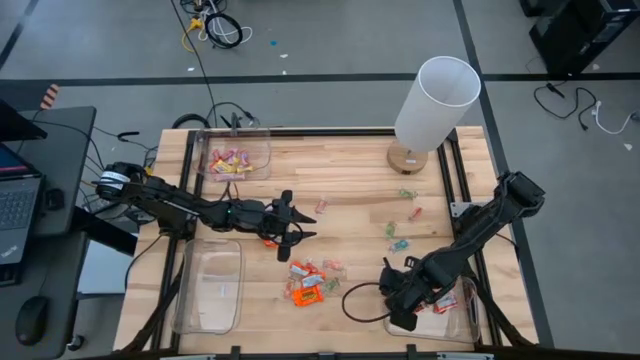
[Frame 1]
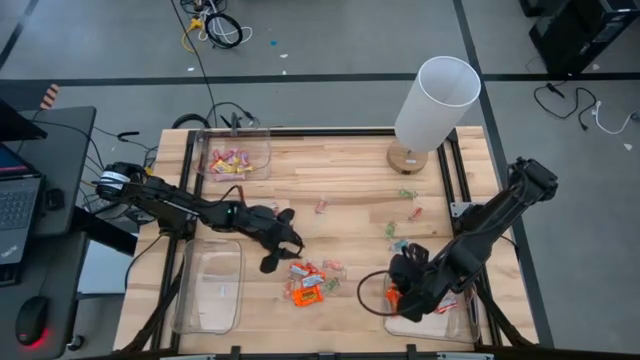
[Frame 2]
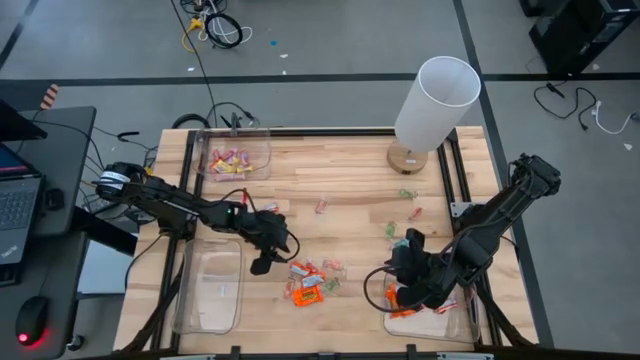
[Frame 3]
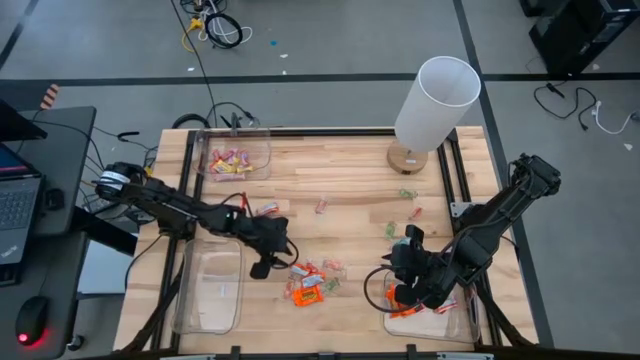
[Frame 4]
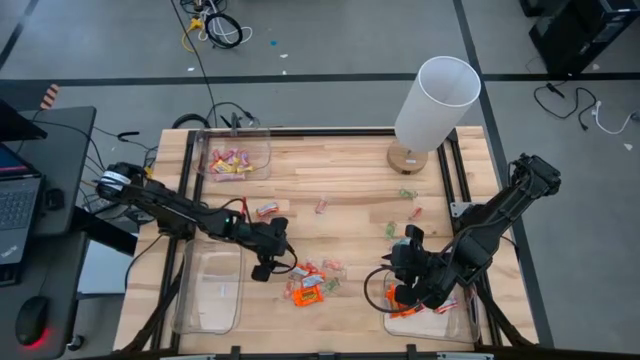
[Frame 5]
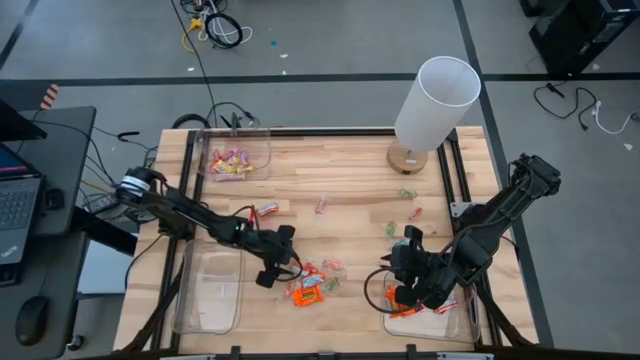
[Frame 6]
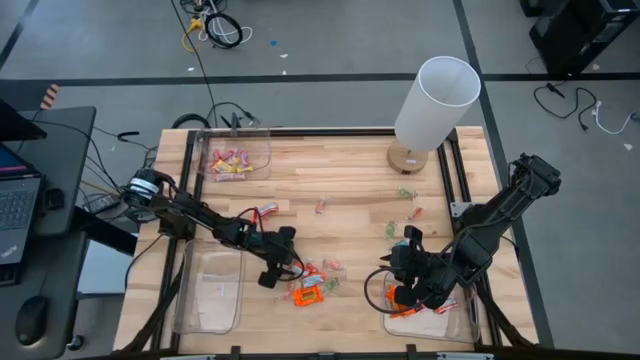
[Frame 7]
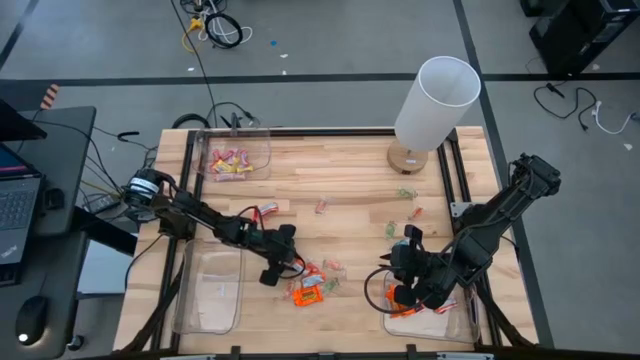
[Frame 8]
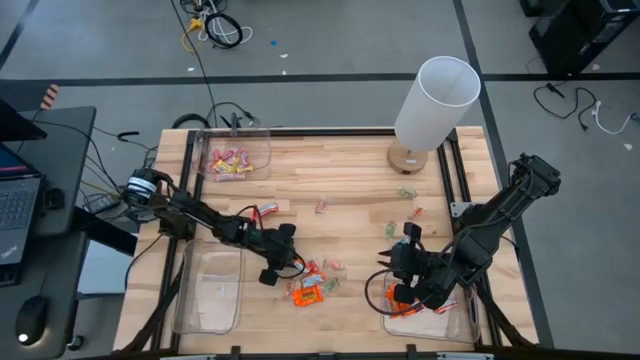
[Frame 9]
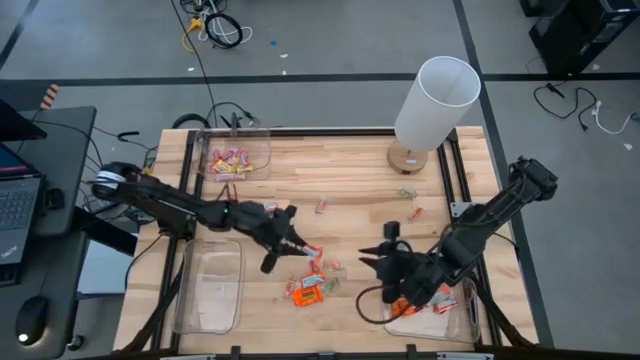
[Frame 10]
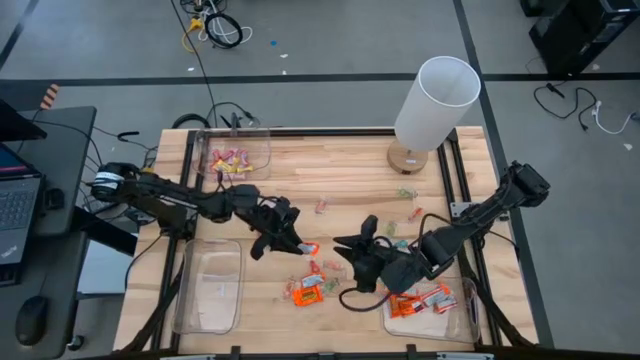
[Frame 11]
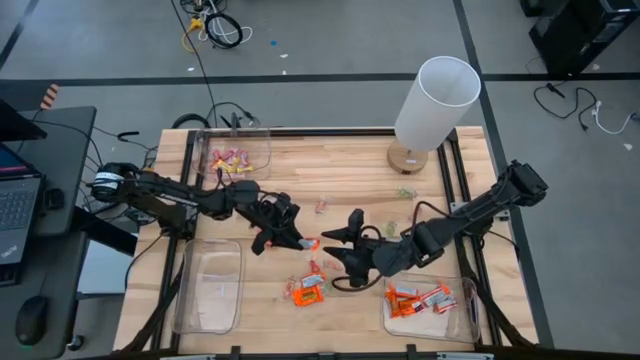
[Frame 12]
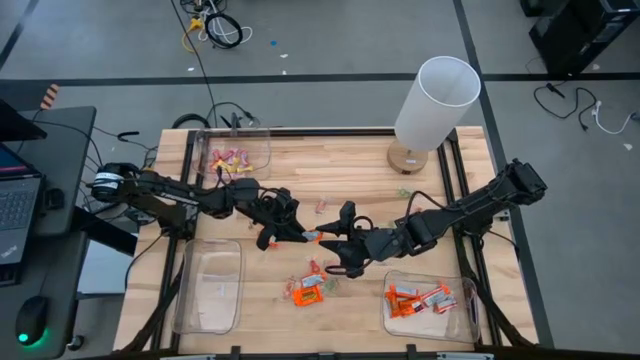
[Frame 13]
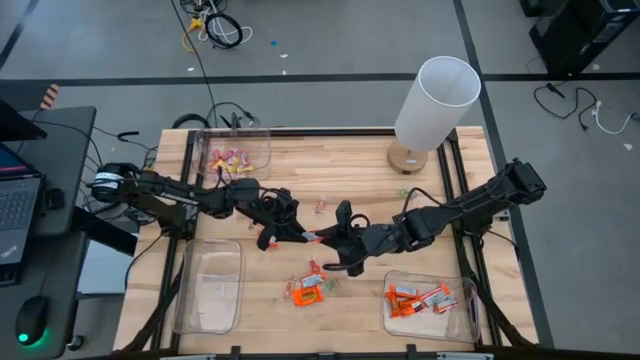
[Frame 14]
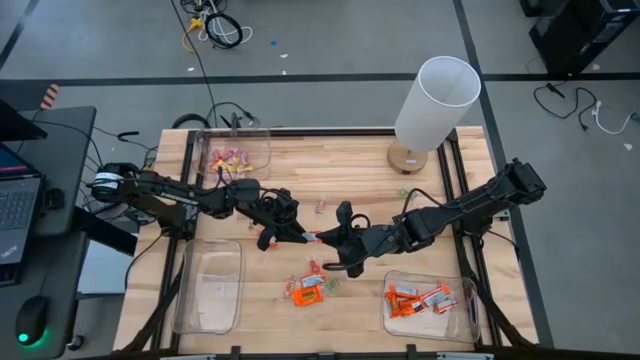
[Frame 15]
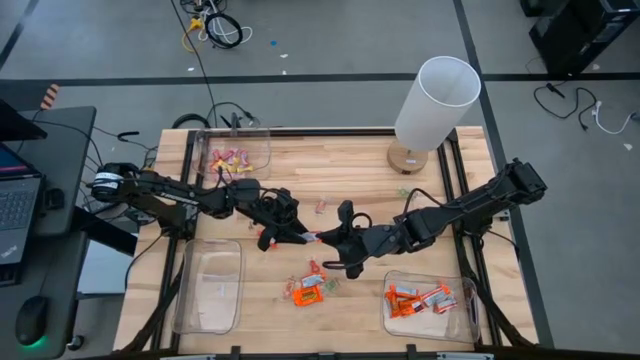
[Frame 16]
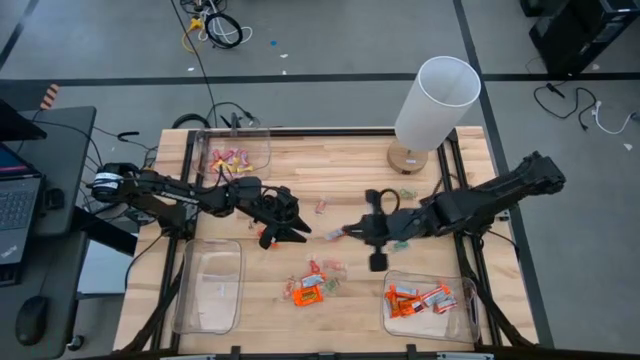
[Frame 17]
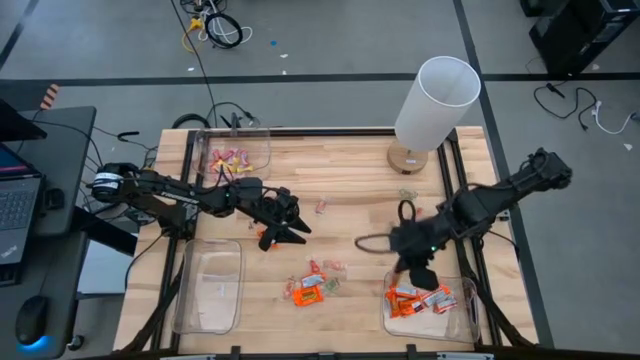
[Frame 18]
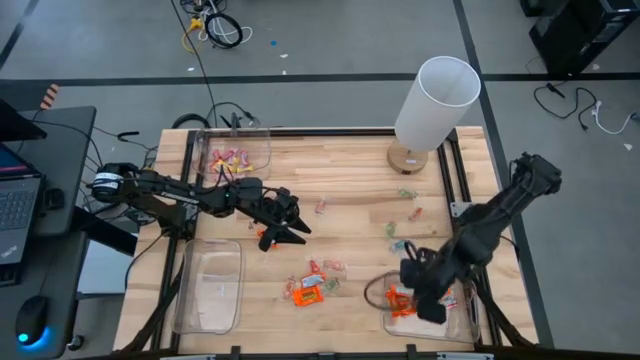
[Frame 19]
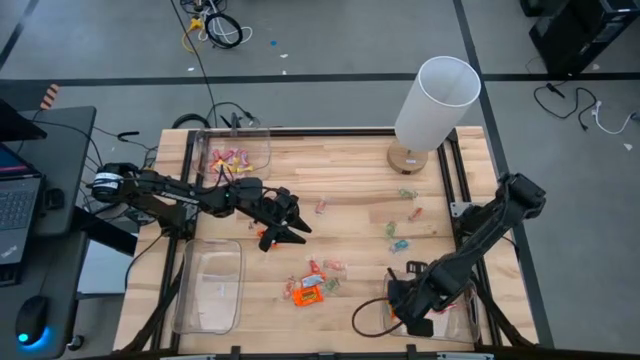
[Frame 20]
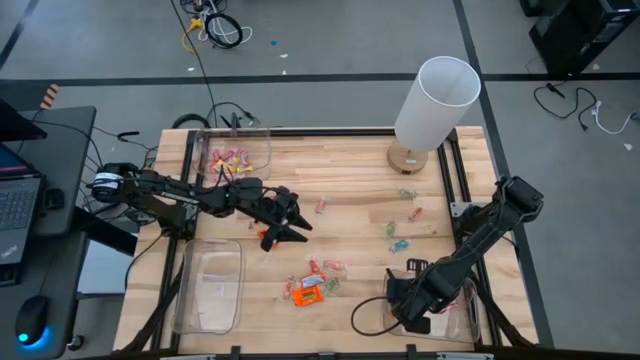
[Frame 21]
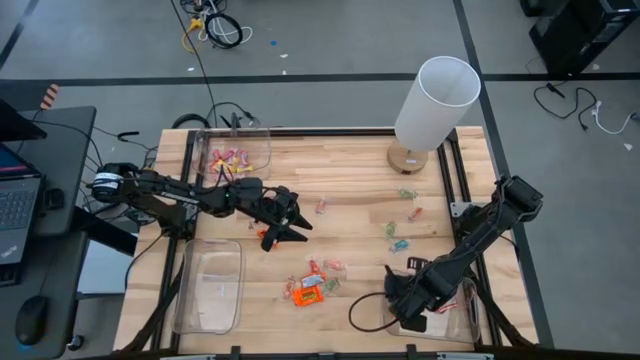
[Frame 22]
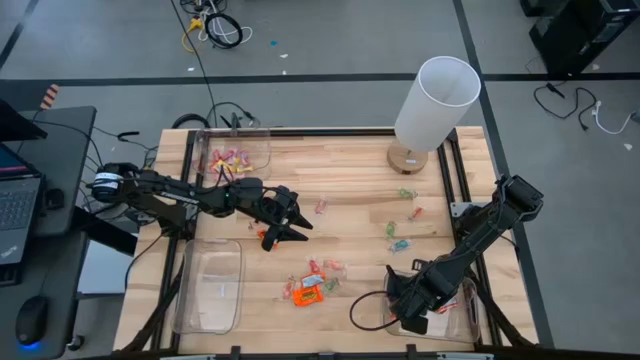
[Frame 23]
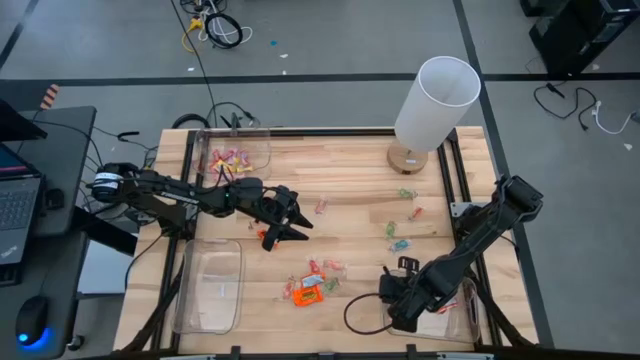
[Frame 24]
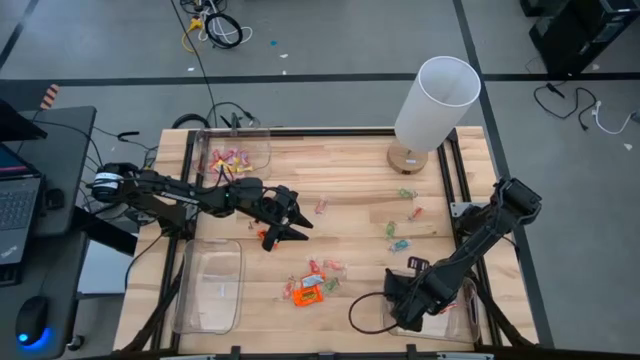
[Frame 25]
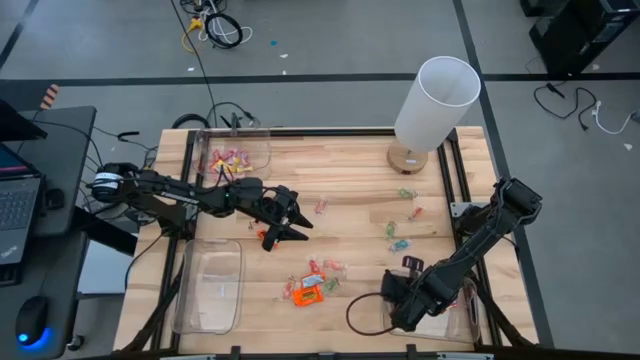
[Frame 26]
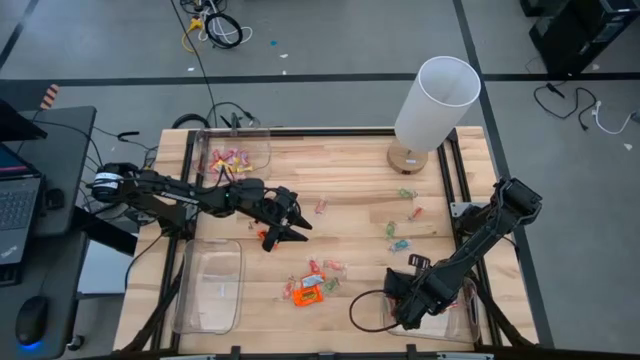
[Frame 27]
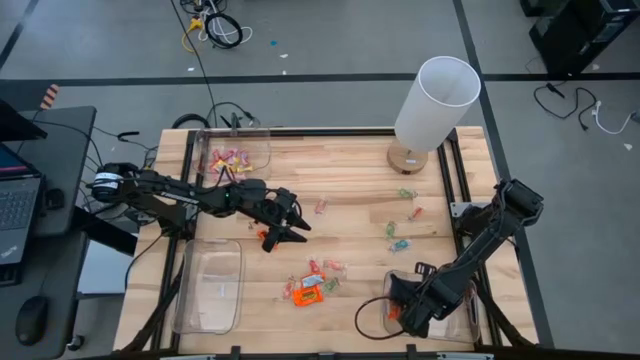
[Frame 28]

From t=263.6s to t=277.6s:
Task: Sort candy
Put the chocolate into the bottom right transparent bin

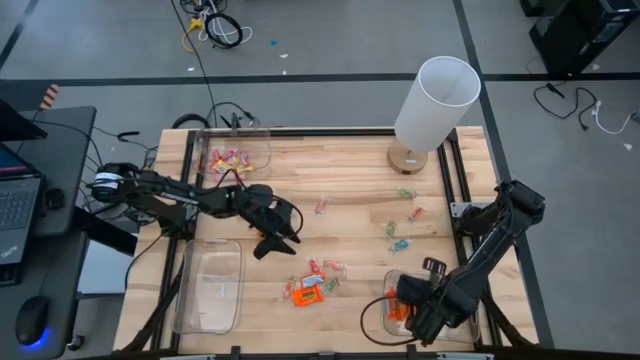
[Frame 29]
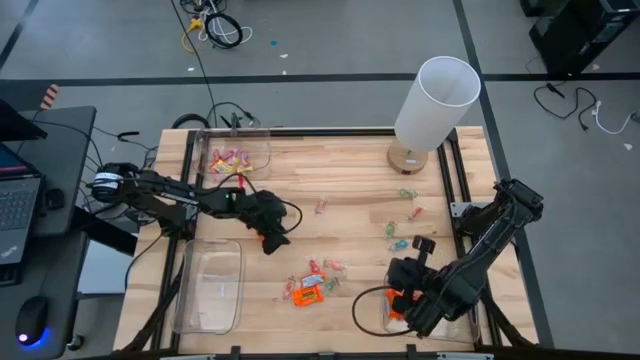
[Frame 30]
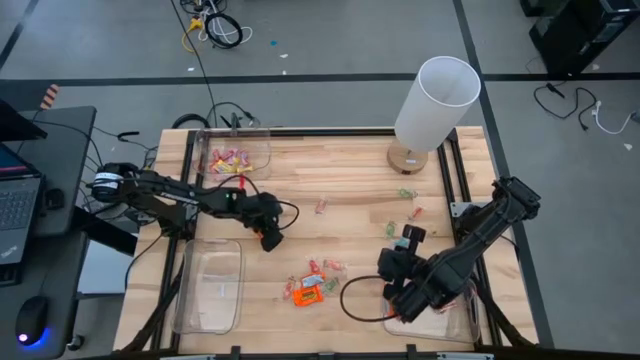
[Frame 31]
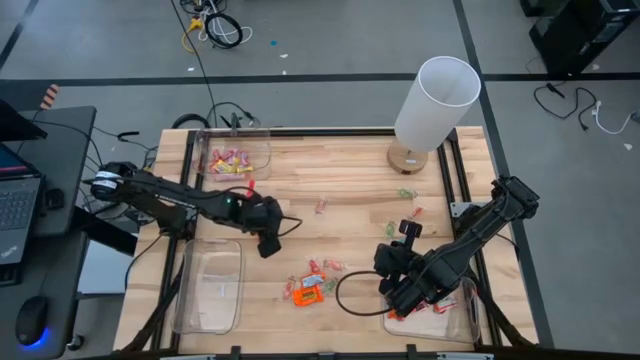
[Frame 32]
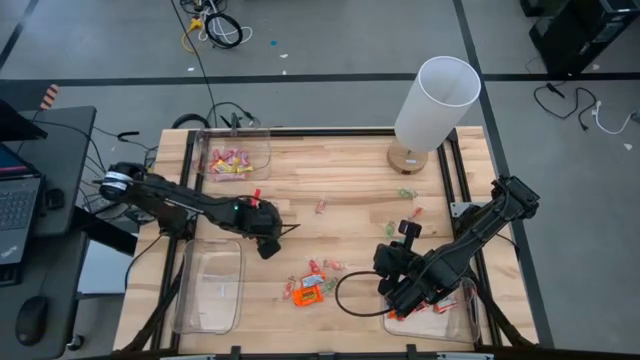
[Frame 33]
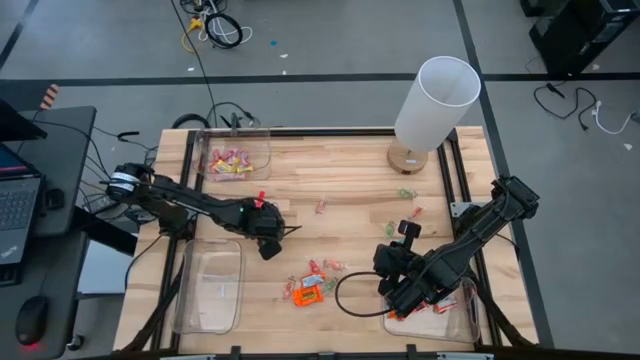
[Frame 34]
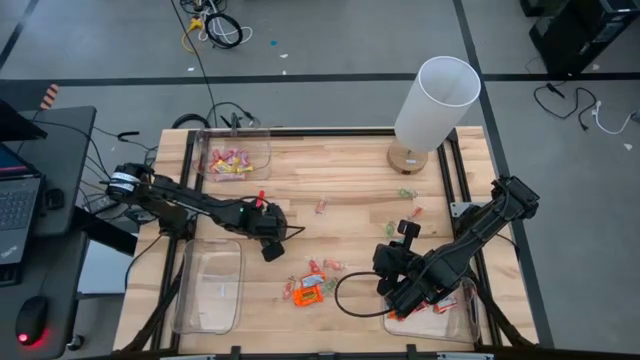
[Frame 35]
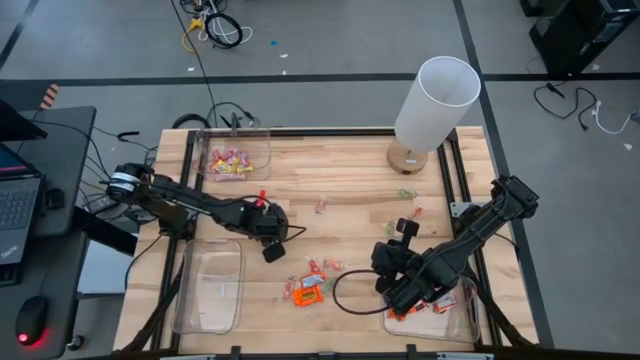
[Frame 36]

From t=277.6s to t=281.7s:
Put the chocolate into the bottom right transparent bin

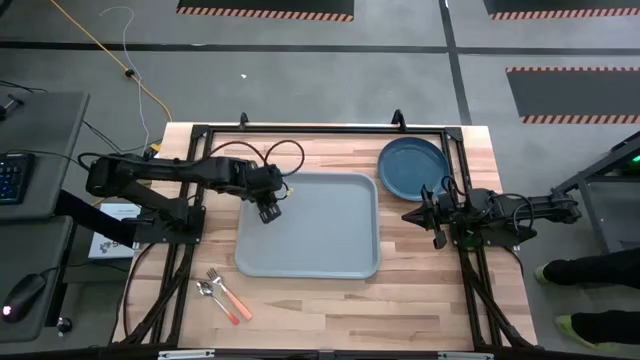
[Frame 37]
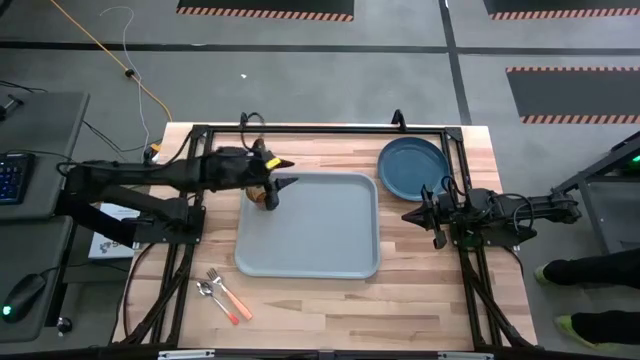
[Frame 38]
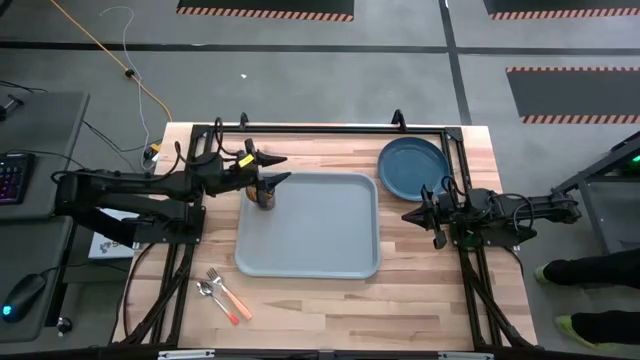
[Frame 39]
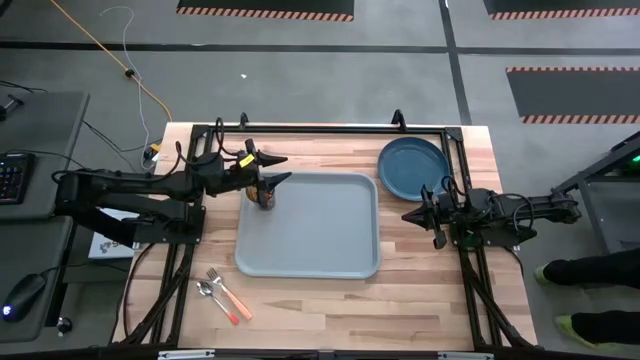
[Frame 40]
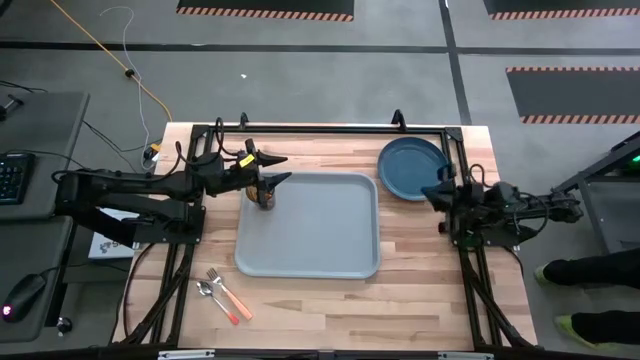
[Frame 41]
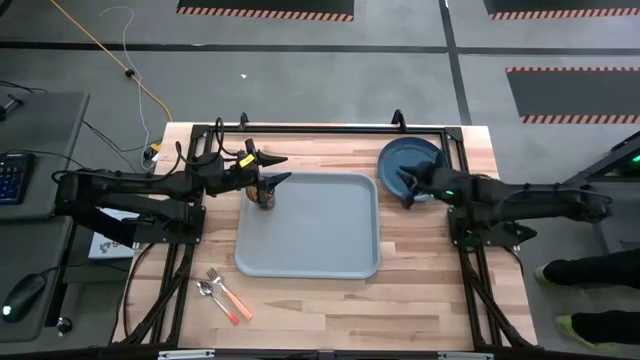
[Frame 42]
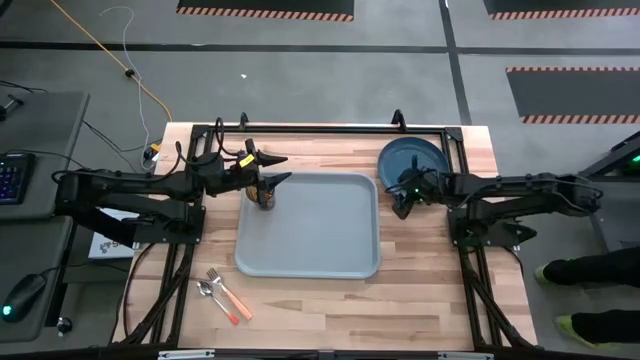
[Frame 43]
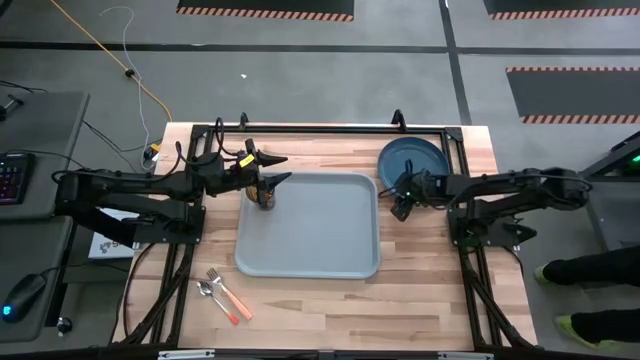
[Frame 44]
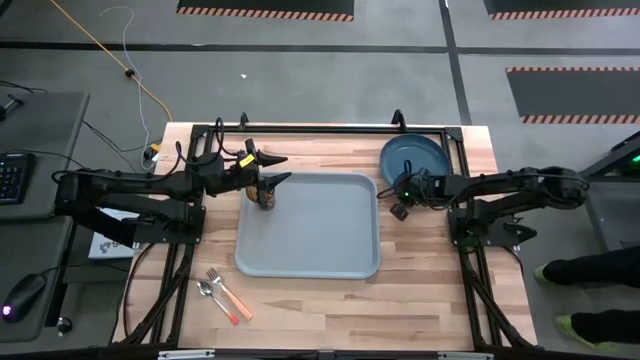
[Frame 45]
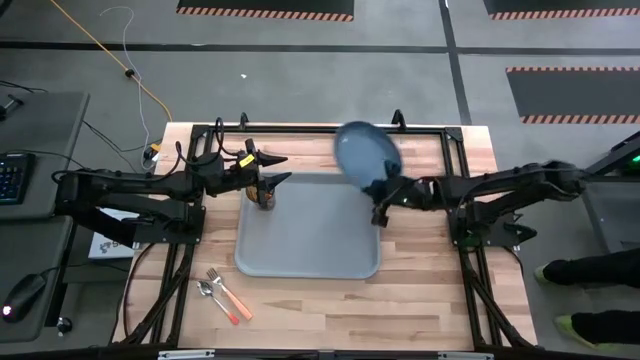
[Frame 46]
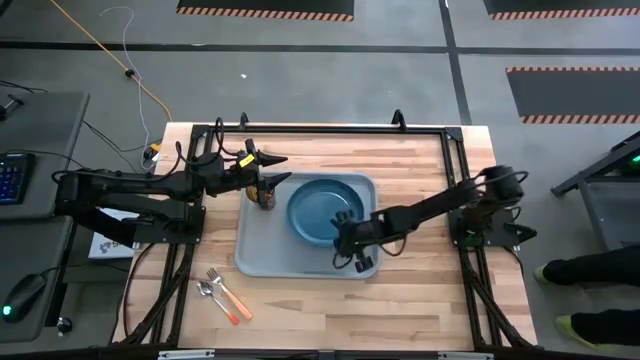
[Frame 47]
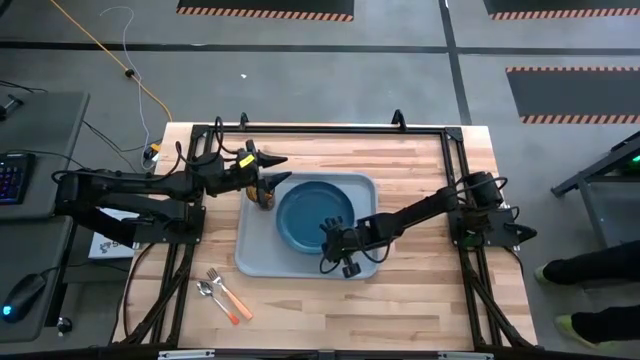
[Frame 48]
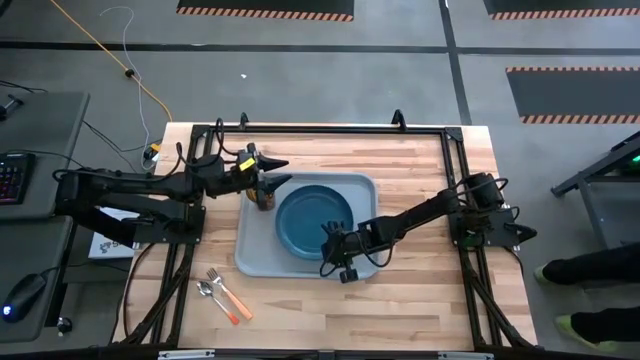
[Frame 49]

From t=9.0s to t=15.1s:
Task: Pick and place plate/cup/fork/spoon on tray
Put the blue plate on the blue tray to the bottom right of the brown glass
